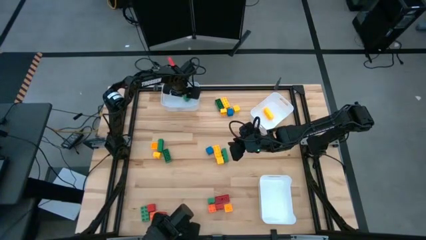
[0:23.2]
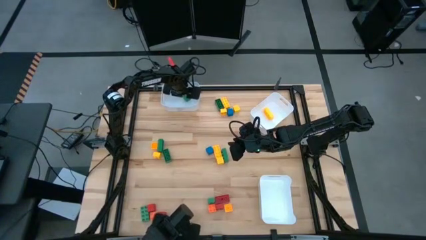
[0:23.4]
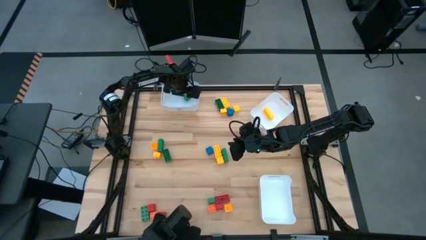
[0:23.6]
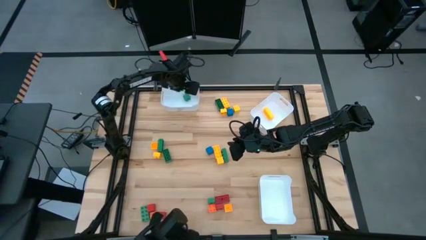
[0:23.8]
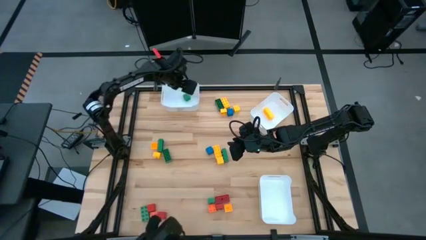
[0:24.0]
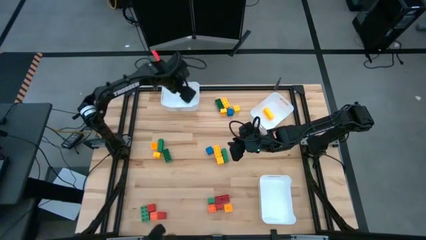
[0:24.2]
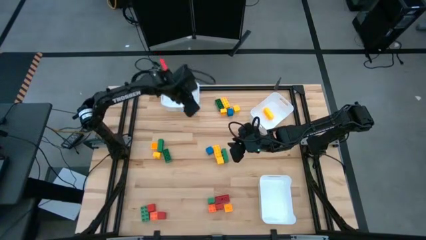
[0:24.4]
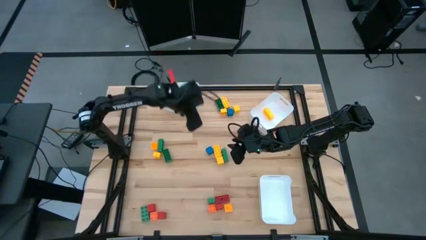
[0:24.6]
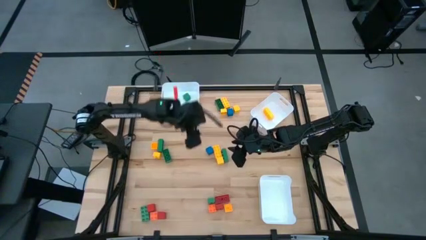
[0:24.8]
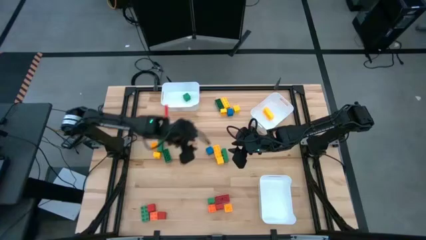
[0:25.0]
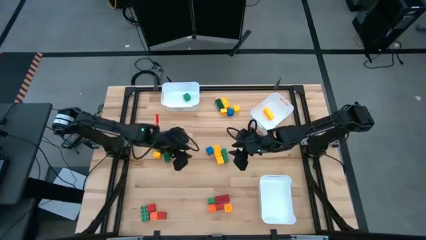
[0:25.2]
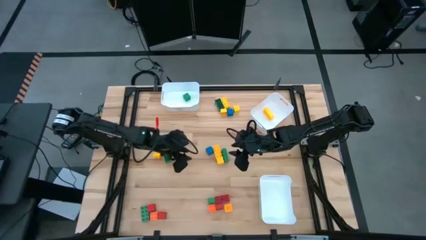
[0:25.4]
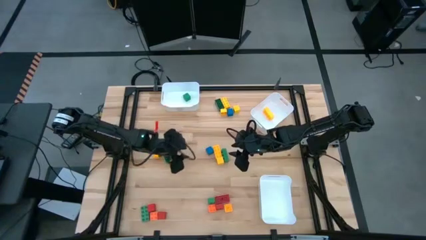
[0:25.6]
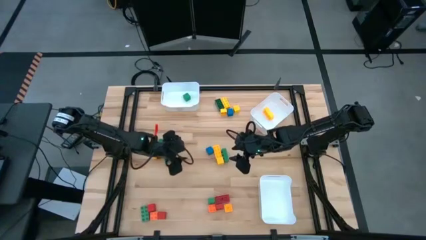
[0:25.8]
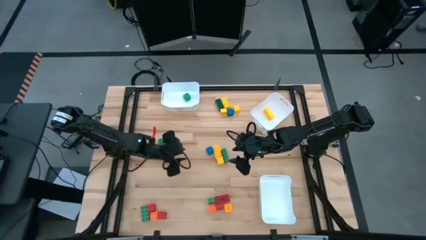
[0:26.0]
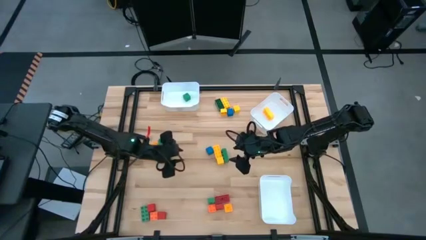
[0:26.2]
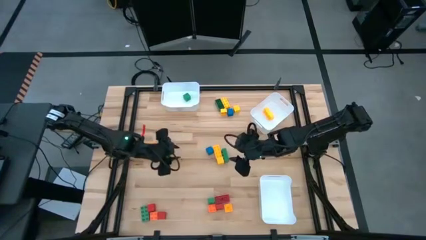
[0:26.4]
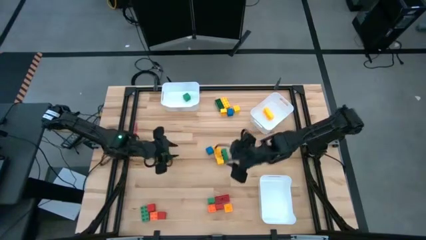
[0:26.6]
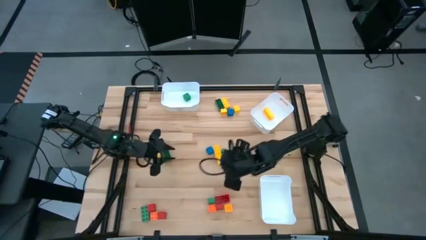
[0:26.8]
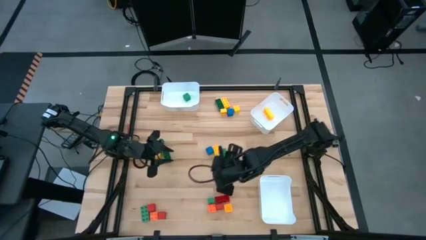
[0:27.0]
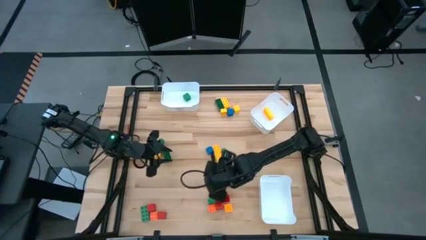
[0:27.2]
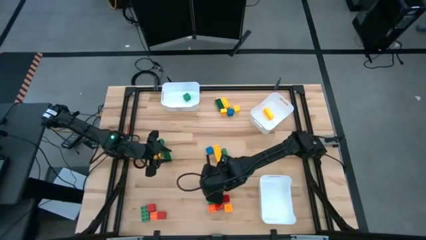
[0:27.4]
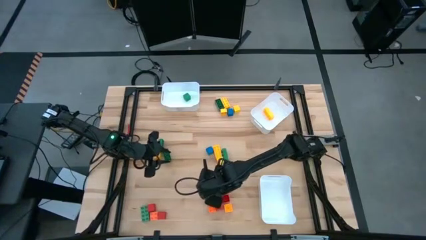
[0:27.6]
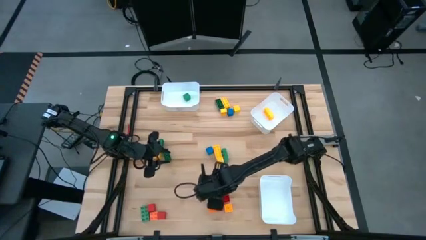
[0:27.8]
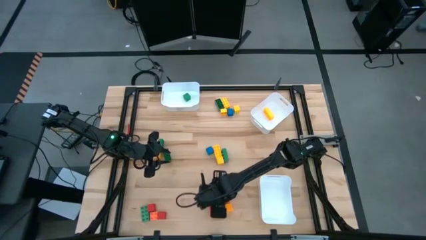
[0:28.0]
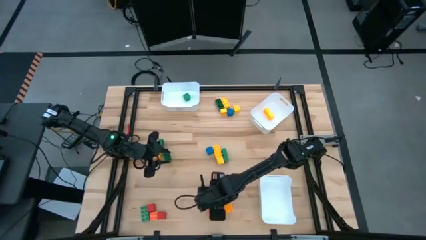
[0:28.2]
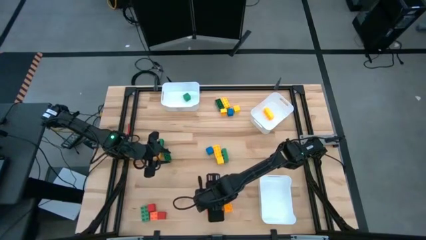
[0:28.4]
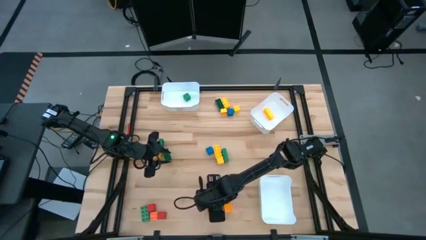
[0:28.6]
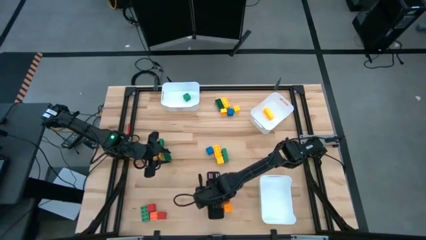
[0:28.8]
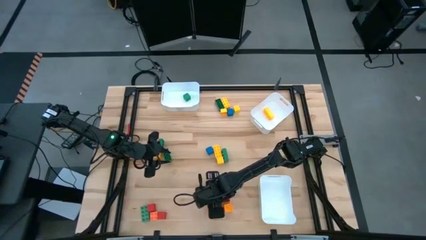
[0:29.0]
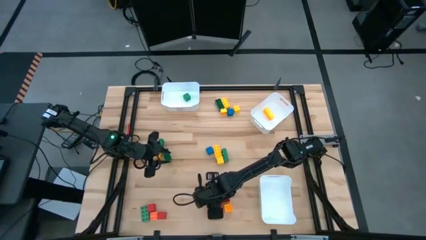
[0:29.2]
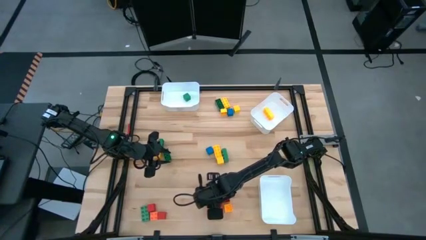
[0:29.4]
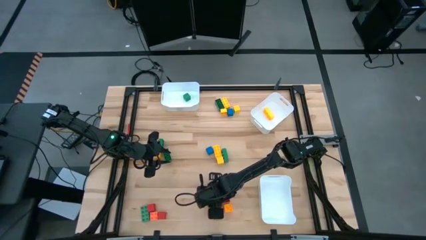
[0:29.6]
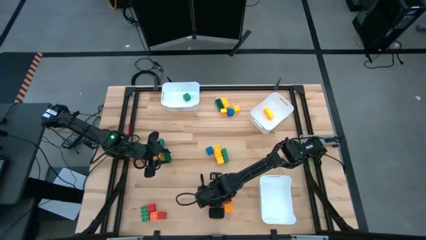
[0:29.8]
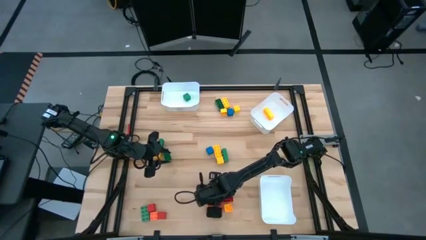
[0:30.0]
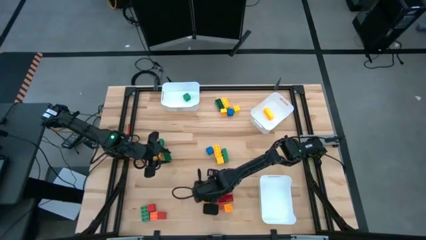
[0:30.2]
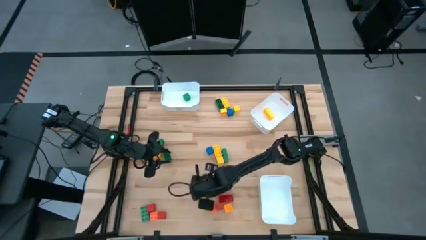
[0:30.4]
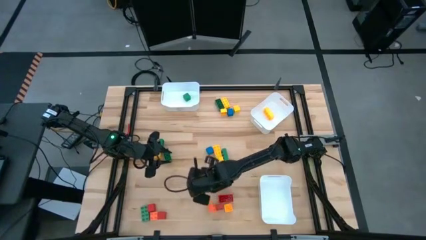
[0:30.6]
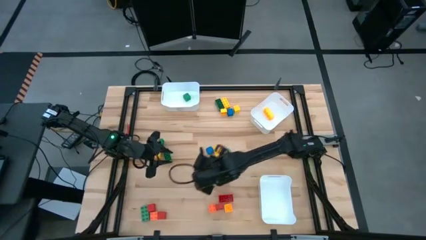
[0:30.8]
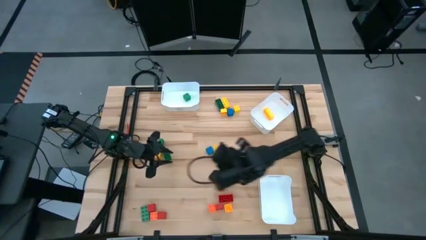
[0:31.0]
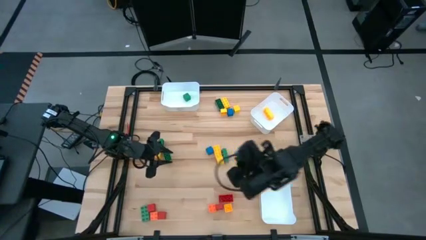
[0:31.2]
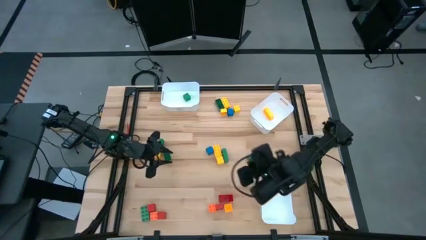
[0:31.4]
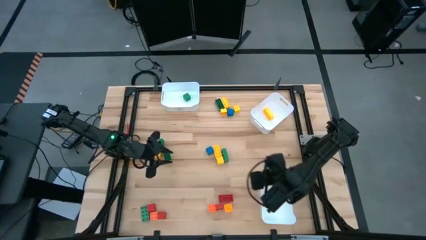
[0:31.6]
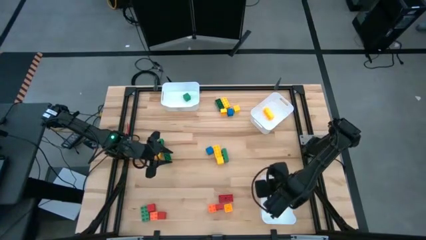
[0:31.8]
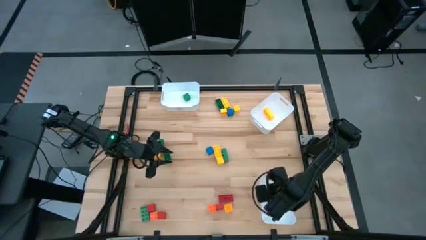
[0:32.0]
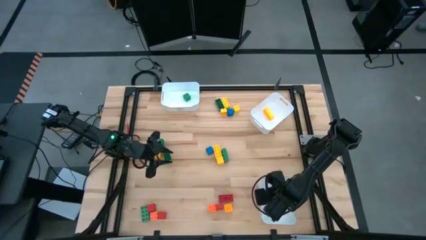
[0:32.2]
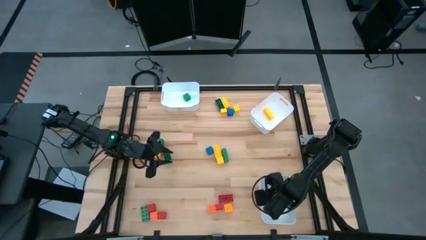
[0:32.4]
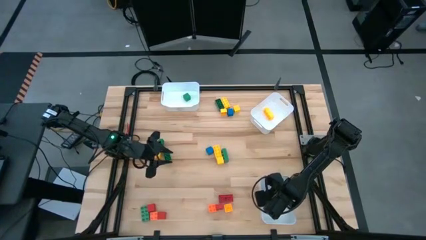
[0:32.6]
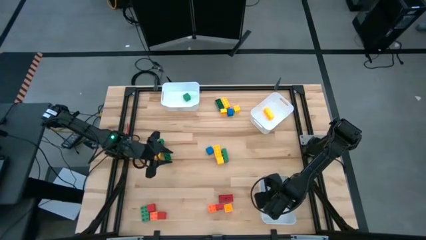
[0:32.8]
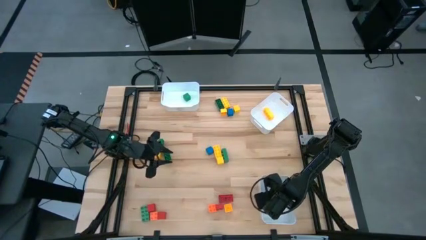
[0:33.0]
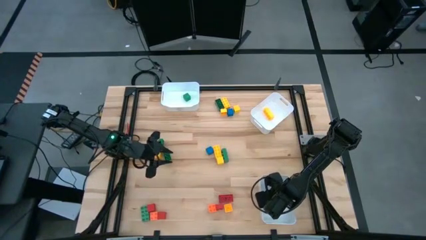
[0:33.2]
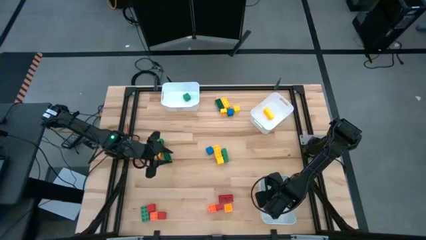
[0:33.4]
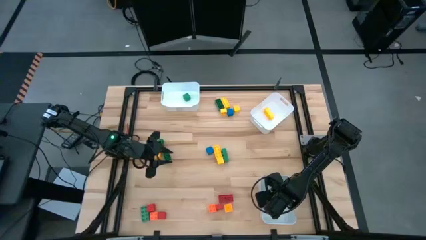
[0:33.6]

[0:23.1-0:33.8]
Task: Sort blocks by size
Put the green 4 stud gamepiece into the bottom white bin

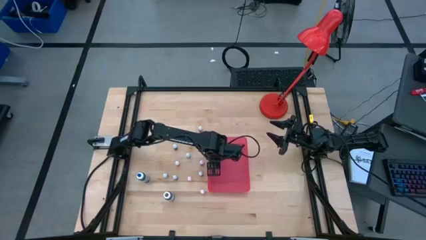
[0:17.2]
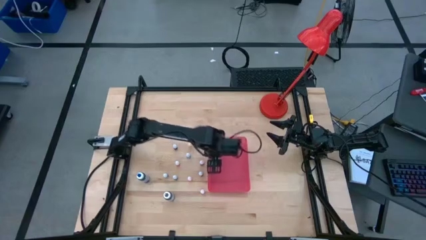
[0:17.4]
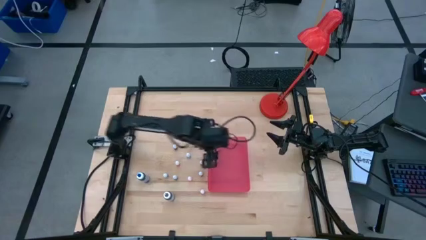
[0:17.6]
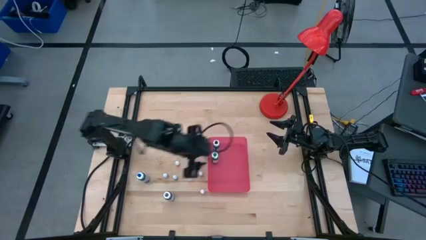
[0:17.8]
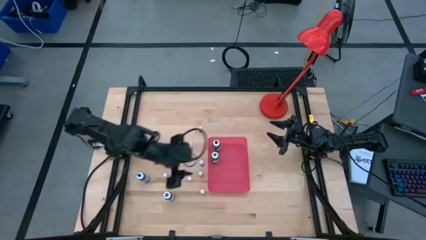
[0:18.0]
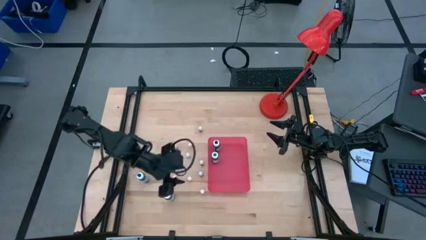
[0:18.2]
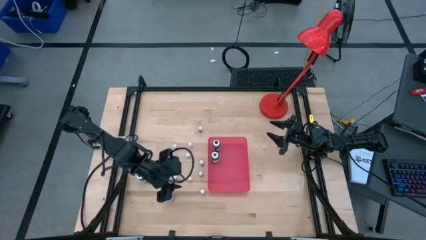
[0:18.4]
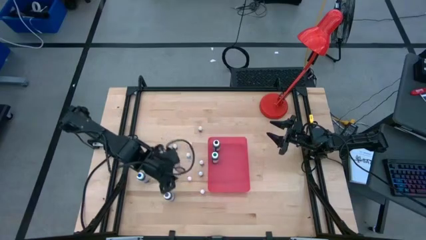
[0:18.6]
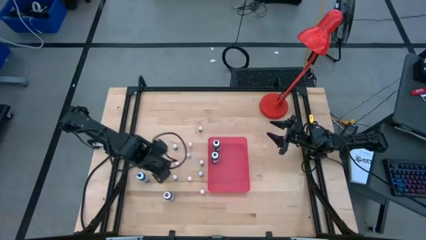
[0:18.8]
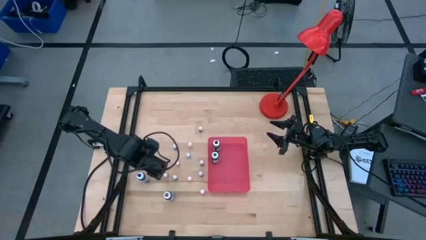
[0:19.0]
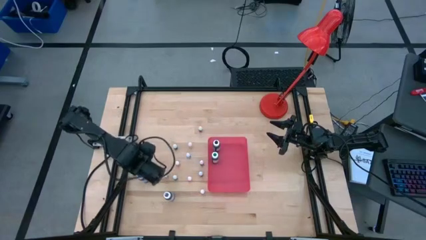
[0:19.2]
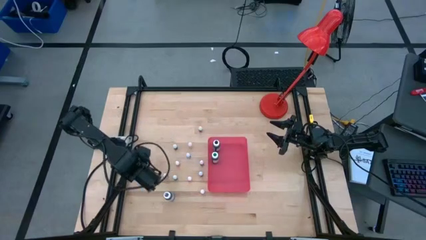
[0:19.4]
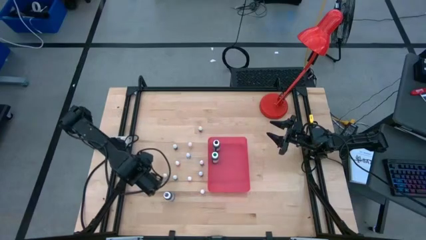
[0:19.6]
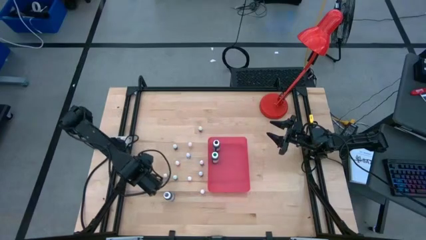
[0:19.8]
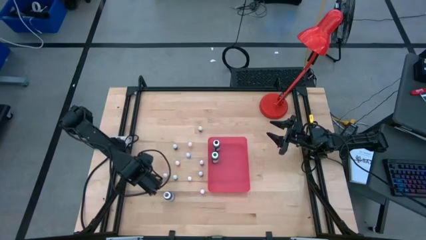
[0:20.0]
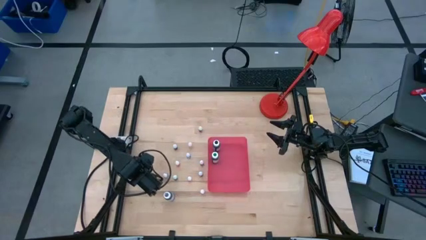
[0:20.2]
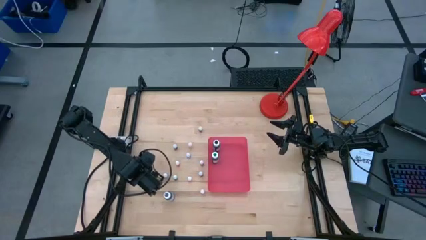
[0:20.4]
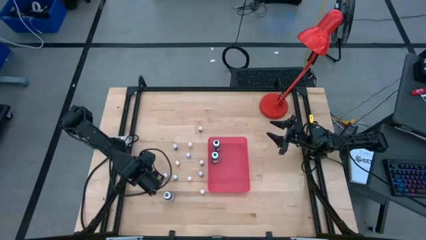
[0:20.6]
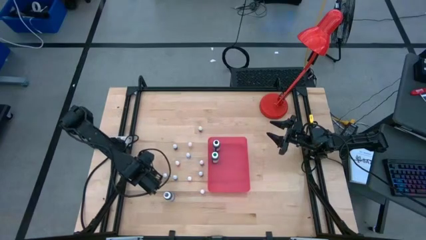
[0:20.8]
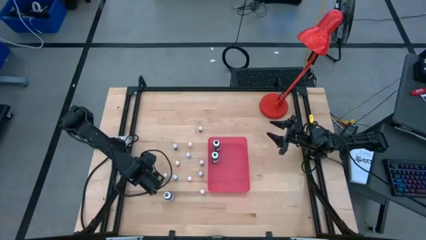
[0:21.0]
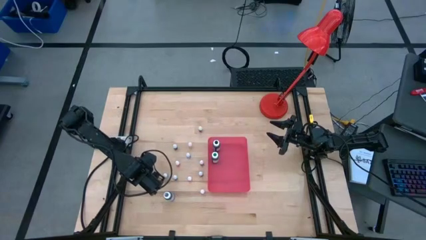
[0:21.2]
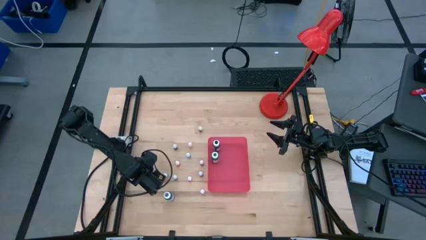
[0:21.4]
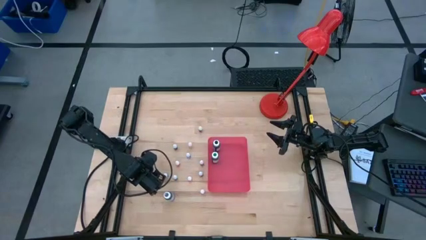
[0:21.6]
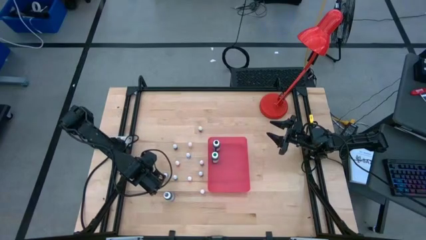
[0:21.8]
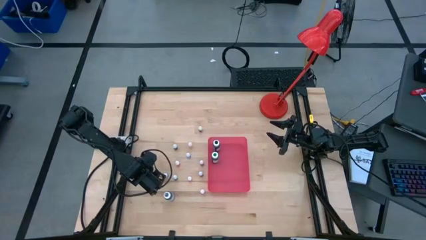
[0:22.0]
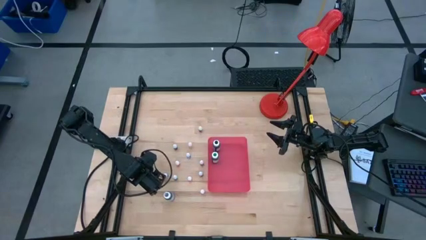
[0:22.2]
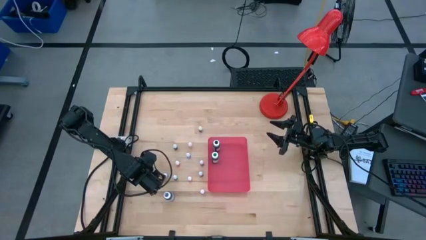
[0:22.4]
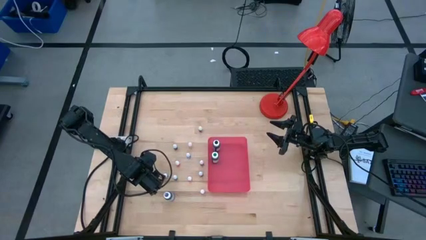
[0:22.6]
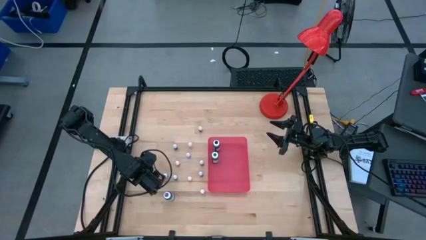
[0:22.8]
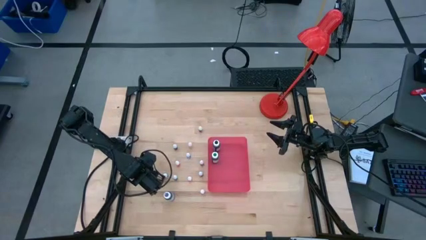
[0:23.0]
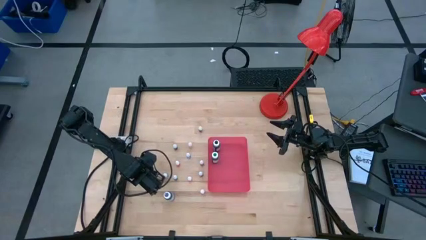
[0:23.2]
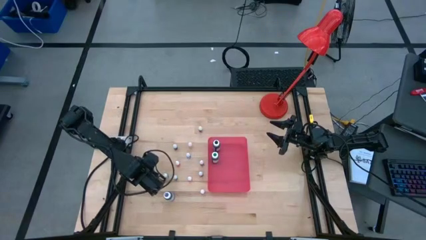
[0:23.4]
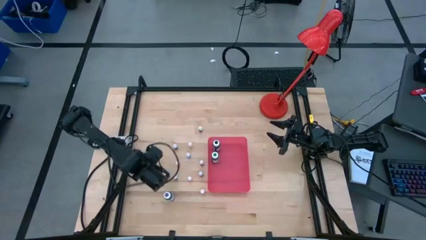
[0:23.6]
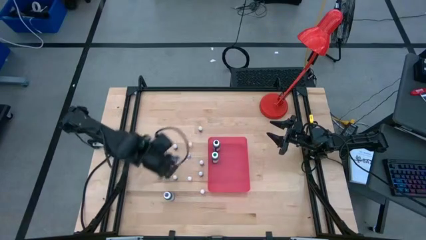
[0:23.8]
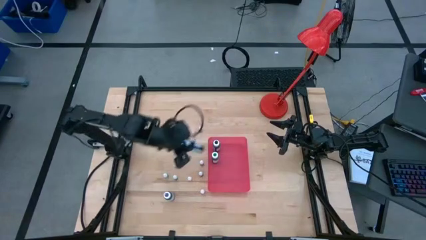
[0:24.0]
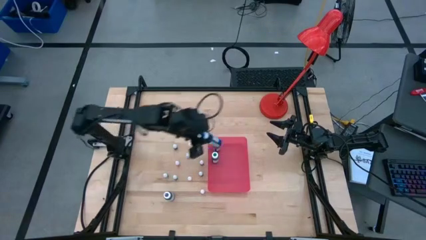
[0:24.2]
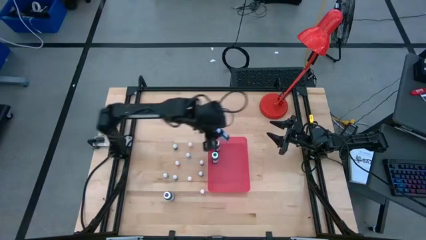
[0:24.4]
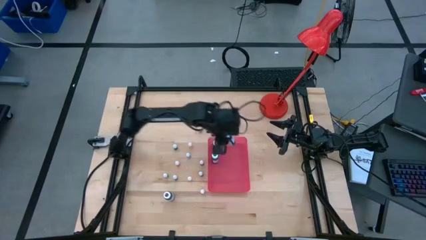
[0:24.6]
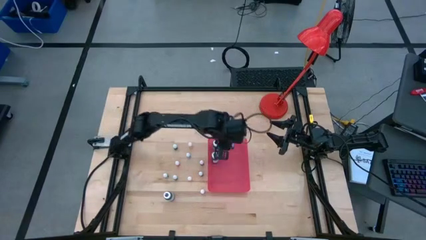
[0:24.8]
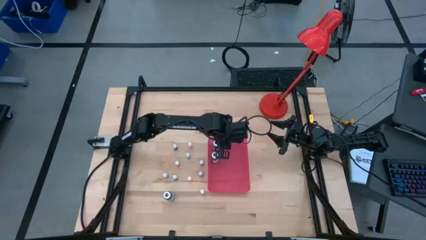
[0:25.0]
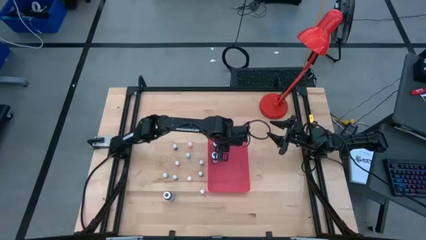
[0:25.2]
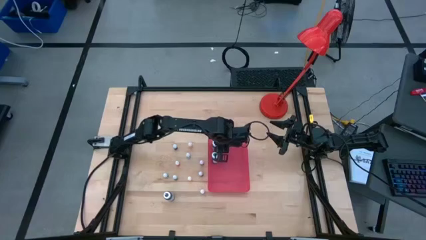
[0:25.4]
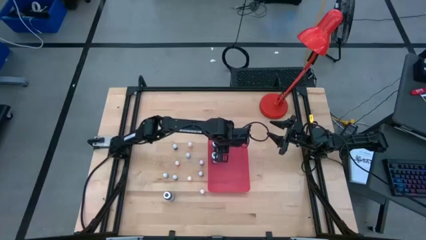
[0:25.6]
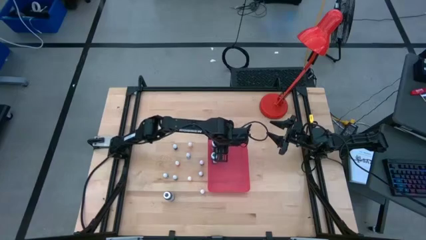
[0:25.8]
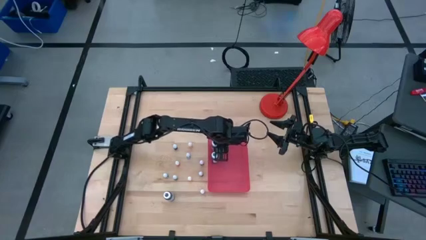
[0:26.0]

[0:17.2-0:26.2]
Task: Pick & Place food coloring
Put the big blue food coloring into the red bin
